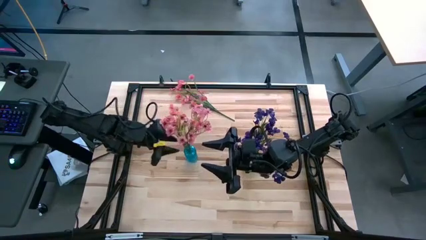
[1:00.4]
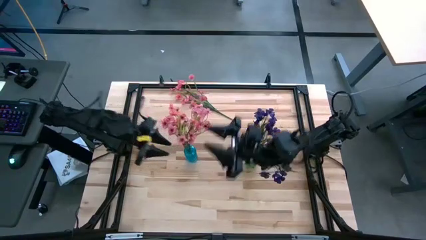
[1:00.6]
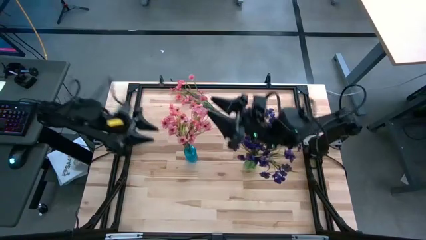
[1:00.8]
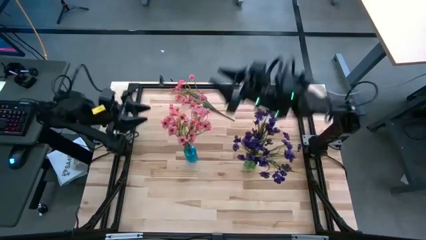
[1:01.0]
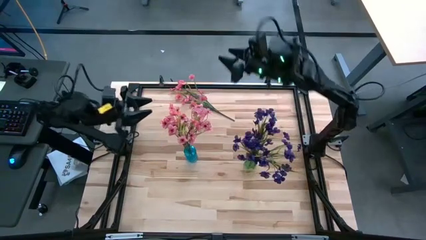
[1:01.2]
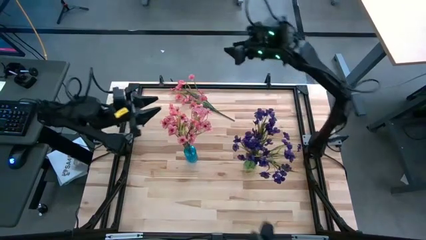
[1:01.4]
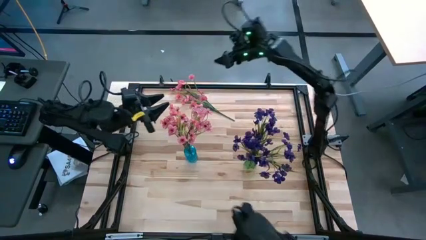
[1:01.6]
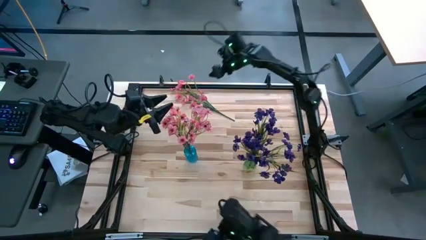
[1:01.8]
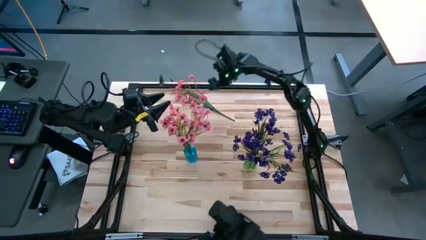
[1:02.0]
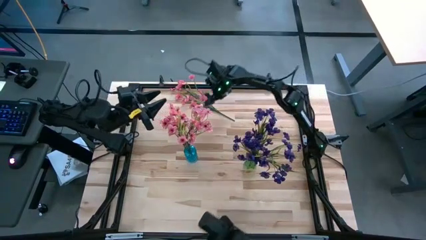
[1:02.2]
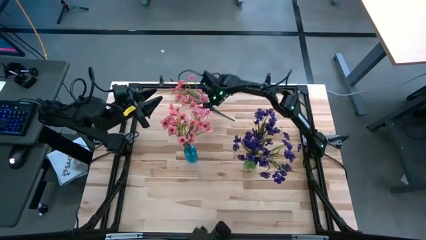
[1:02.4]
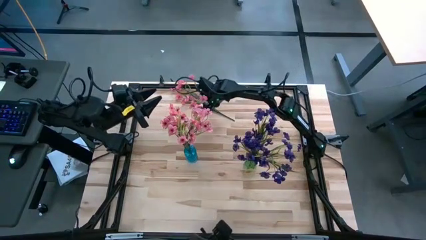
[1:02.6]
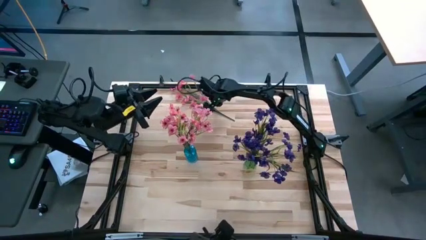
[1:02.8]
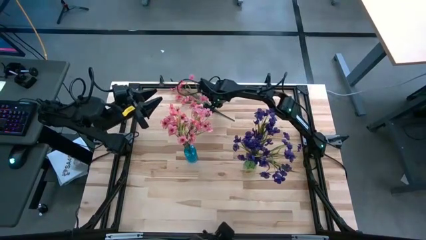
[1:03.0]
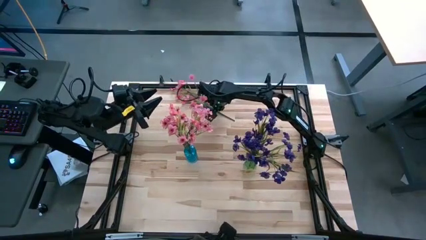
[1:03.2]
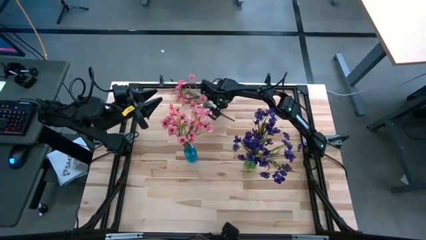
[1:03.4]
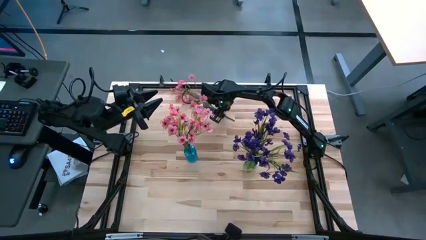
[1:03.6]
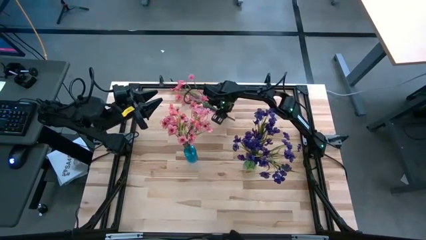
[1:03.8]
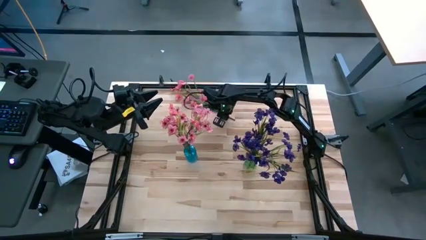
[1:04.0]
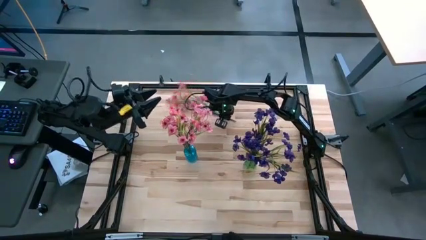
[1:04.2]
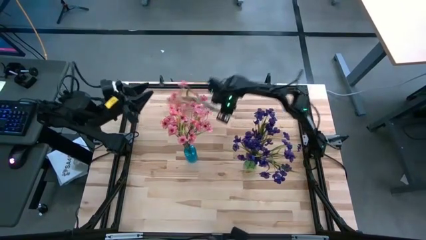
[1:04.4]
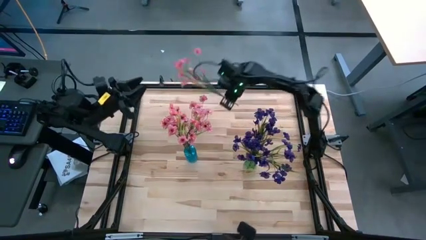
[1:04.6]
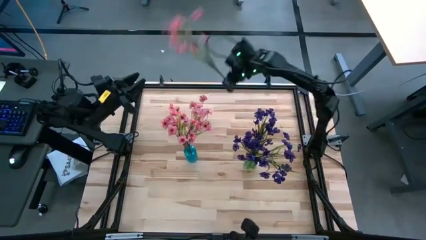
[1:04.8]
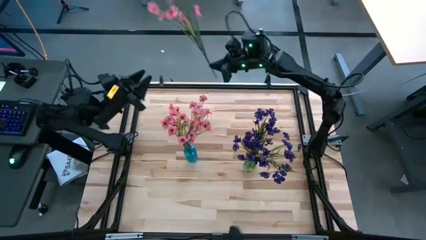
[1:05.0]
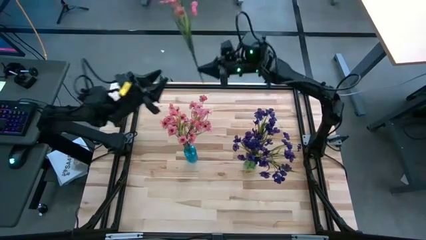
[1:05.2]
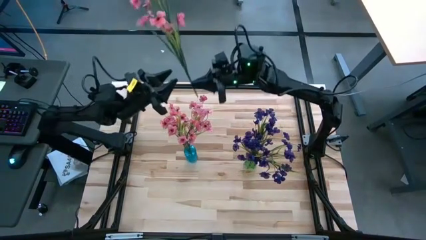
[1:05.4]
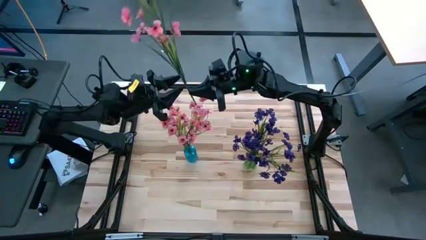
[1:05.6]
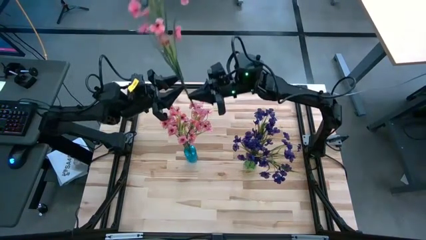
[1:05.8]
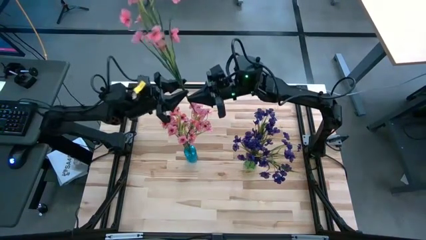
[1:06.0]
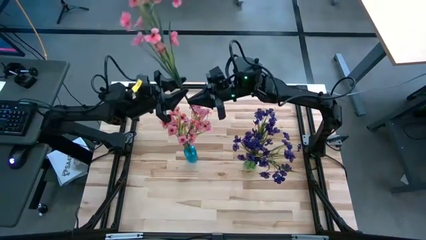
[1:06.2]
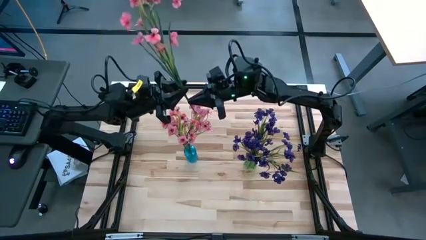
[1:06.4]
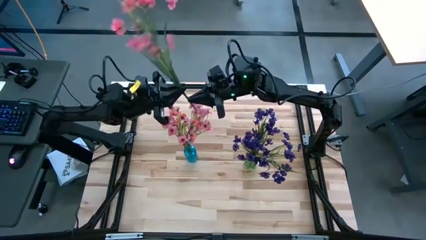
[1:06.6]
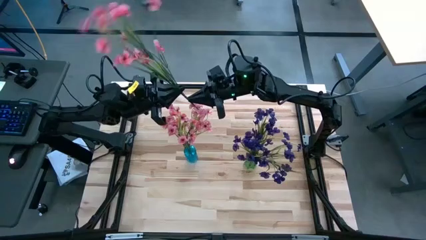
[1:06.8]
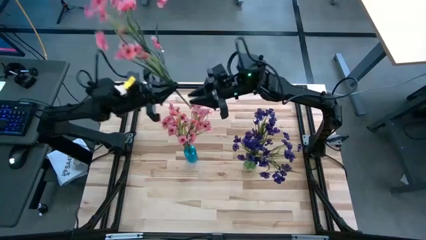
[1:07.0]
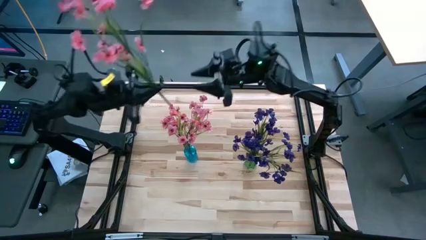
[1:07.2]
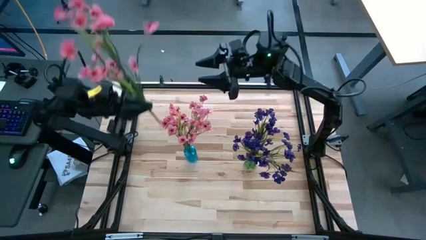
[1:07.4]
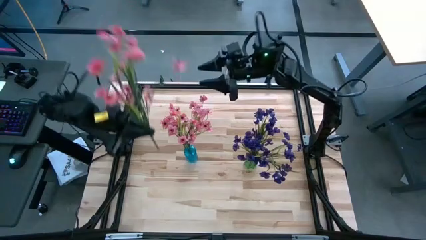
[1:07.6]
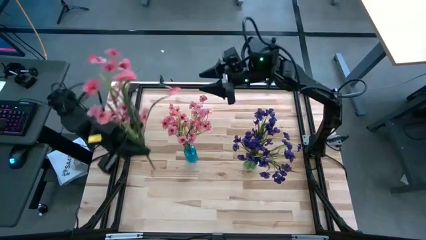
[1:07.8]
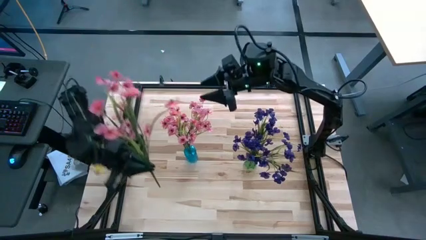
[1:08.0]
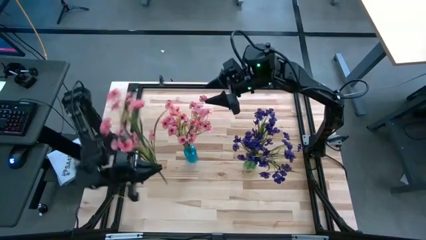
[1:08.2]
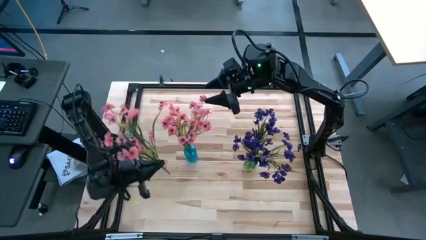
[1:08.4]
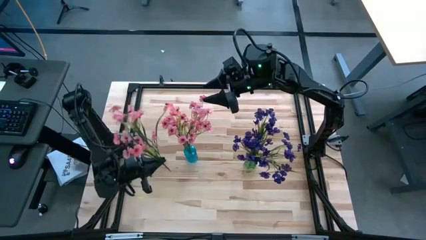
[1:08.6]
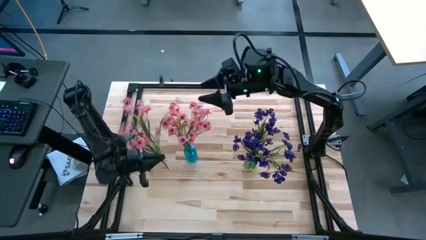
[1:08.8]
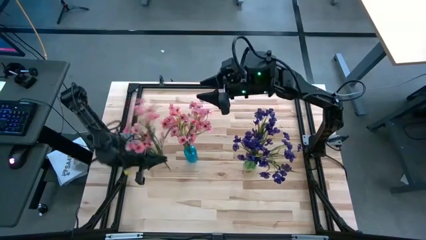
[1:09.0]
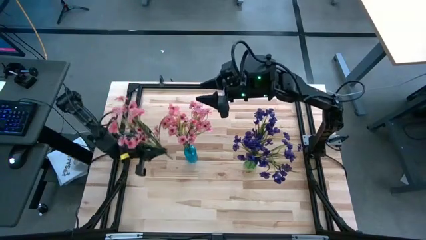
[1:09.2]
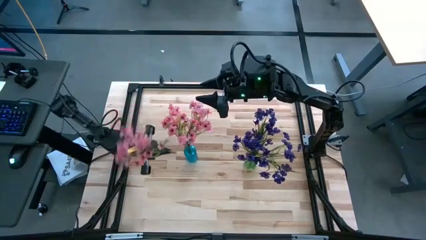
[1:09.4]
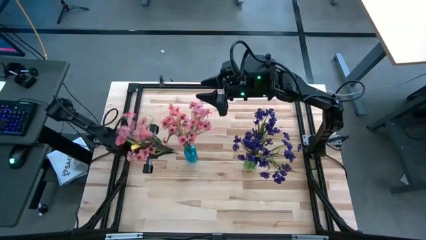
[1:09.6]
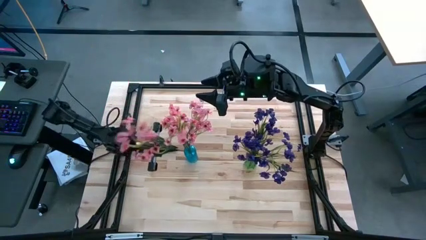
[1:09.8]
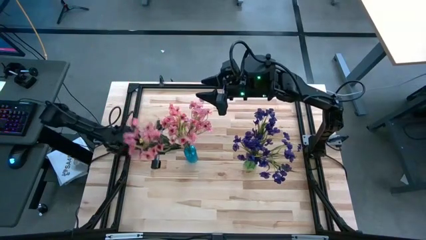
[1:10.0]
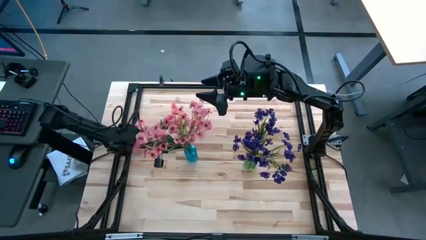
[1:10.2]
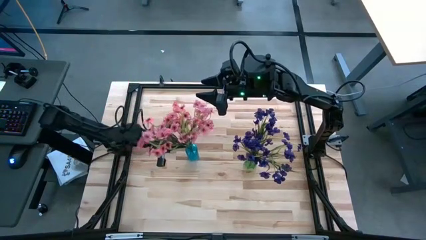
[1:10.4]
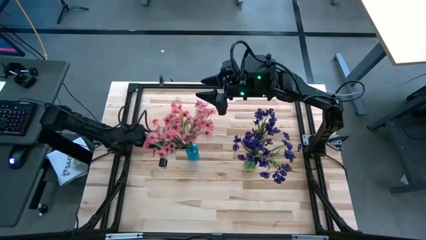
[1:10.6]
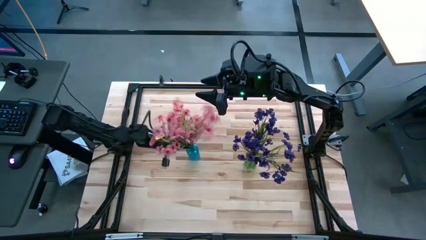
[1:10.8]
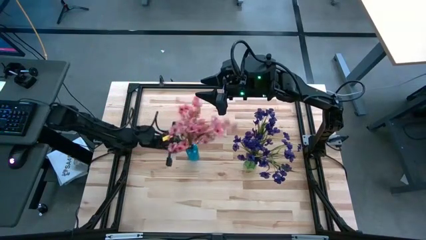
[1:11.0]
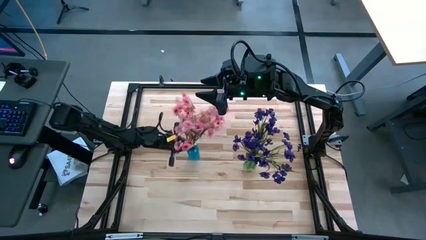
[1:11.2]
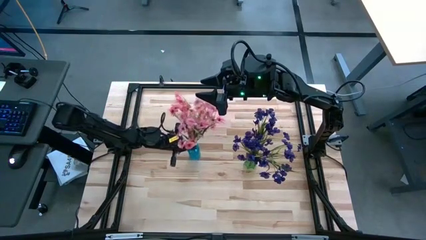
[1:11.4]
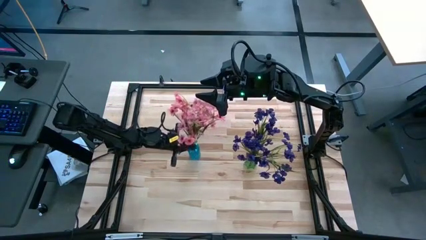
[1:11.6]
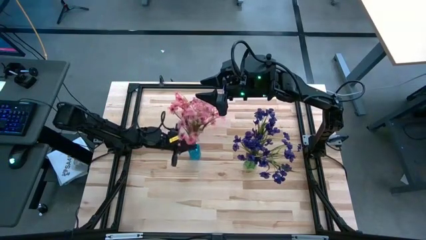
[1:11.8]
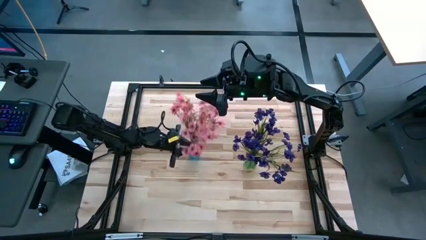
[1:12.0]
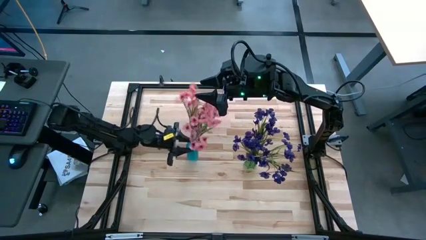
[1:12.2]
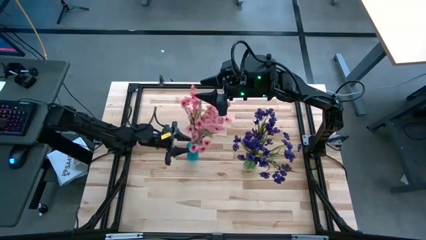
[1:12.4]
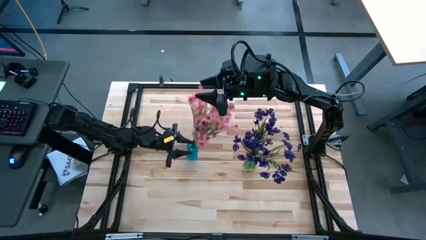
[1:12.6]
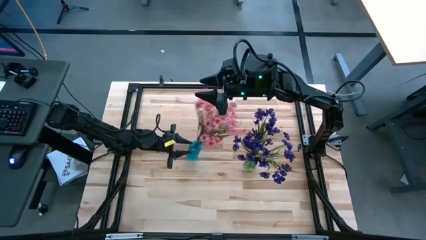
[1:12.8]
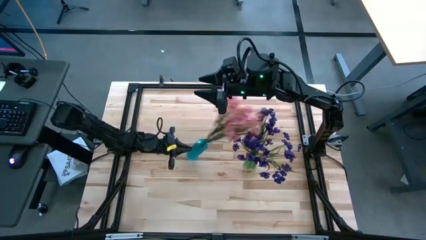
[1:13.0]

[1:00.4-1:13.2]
Task: Sort flowers into vase by color
Put the pink flowers into the blue vase

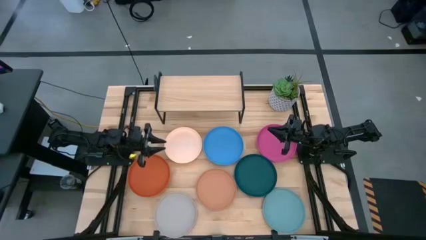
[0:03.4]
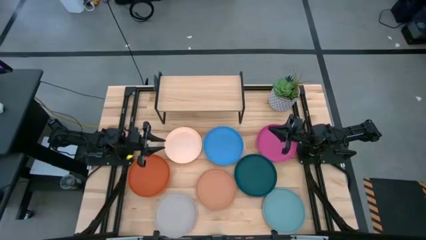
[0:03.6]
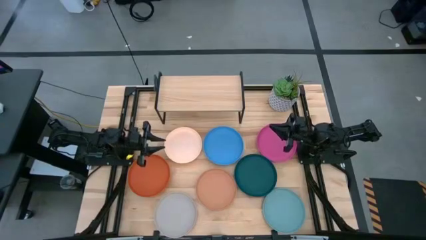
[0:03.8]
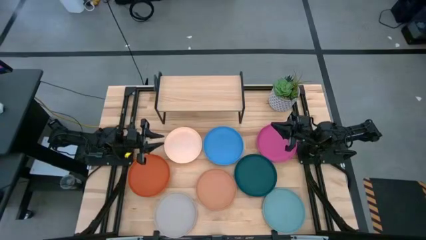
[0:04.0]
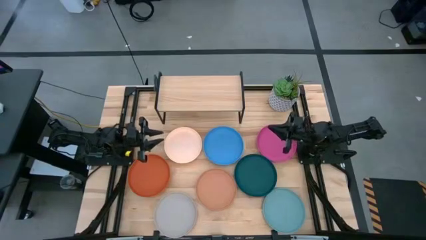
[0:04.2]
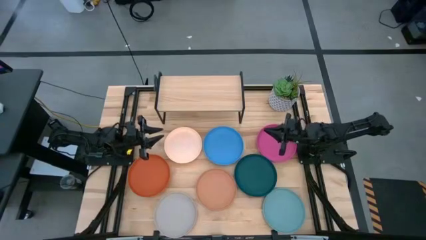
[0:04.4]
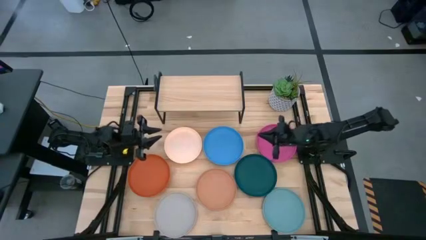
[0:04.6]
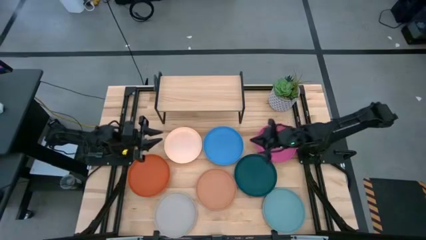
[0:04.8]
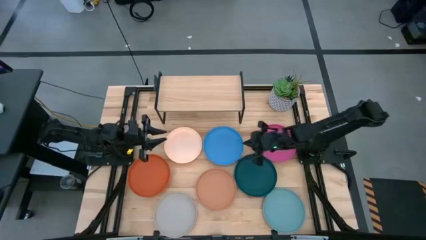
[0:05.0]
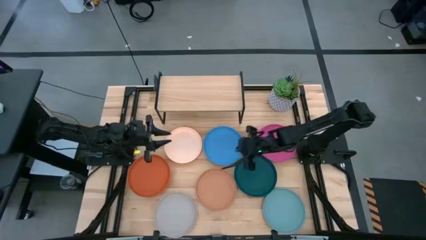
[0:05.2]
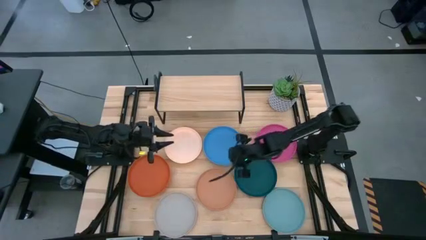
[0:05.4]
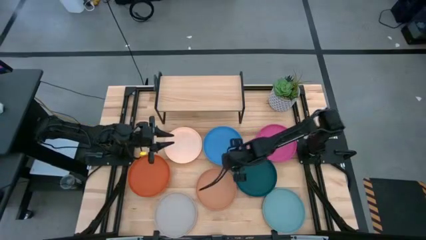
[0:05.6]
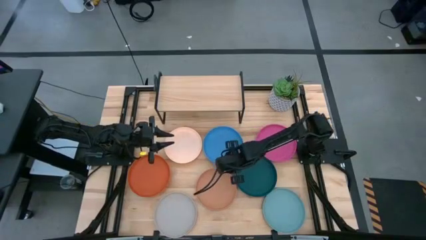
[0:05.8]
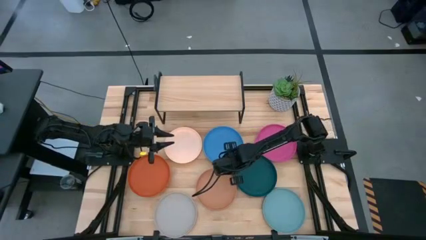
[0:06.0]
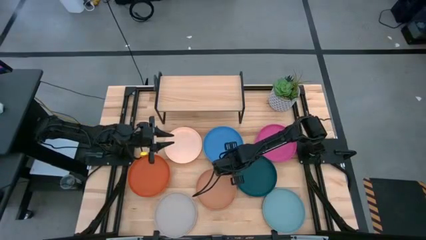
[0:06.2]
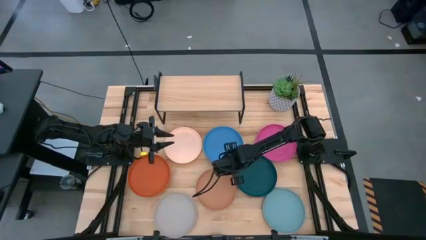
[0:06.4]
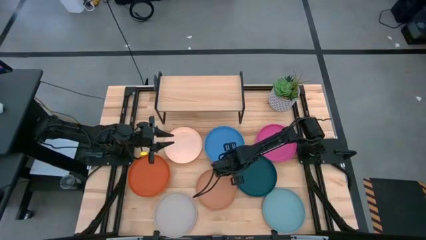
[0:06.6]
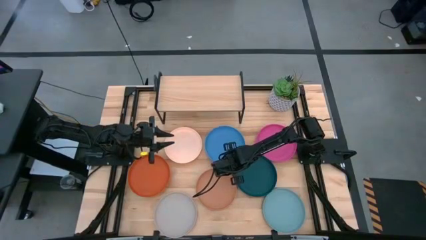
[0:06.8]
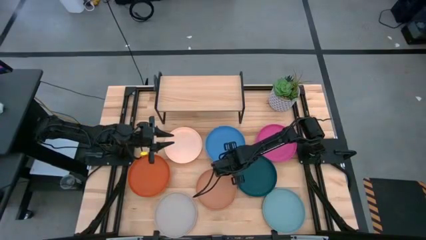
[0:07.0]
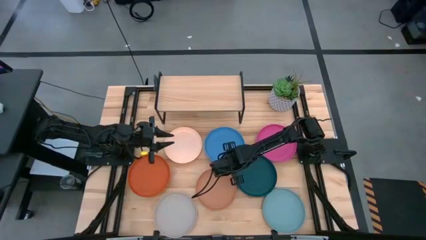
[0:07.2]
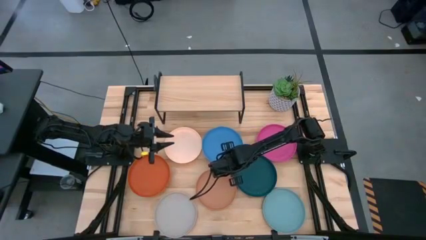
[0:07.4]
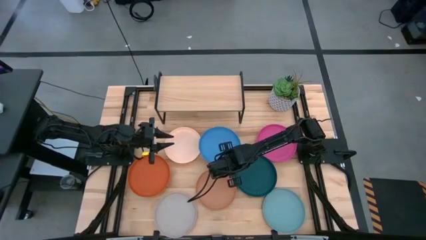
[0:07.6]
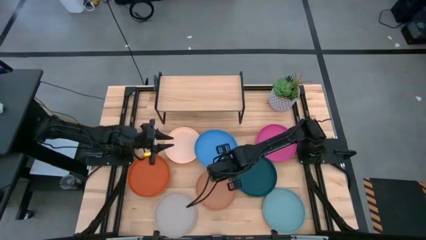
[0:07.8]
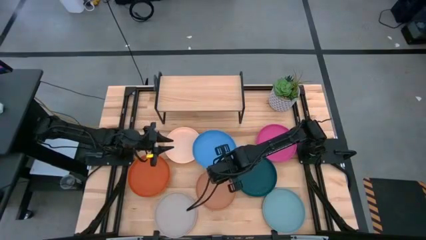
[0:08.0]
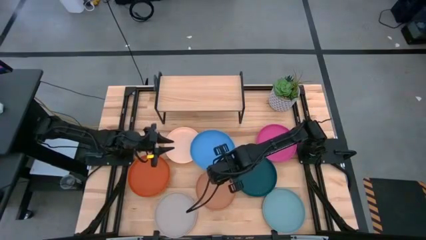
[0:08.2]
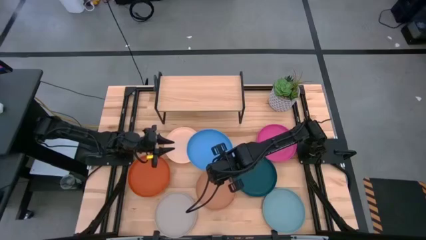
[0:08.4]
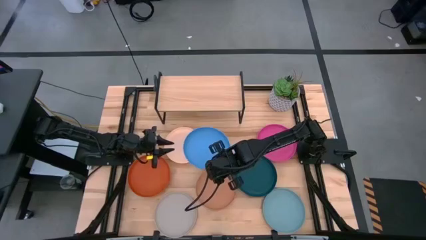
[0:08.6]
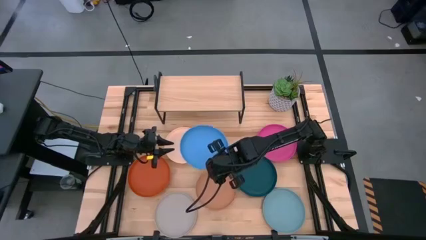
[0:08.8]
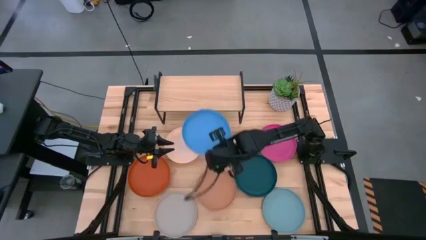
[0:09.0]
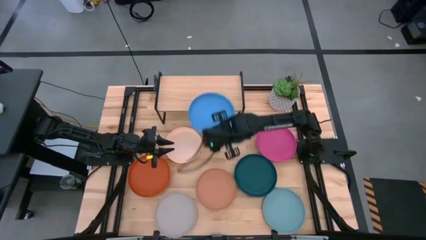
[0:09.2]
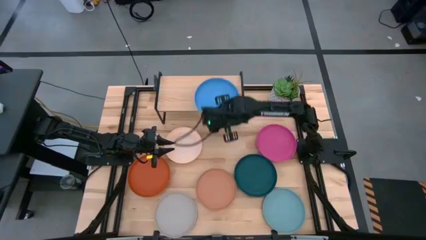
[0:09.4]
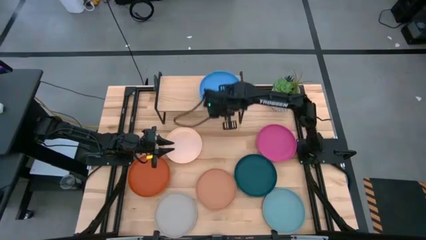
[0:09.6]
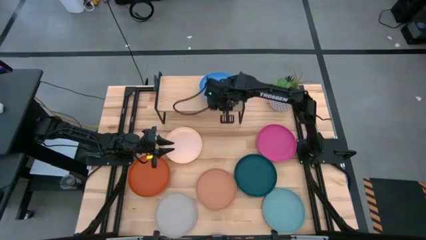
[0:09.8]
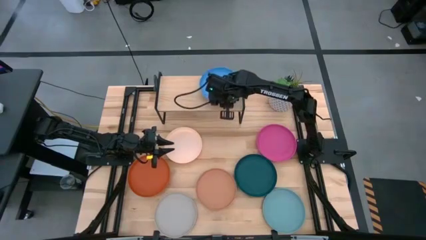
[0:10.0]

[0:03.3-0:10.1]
Task: Place and stack plates onto a shelf
Put the blue plate on the shelf
